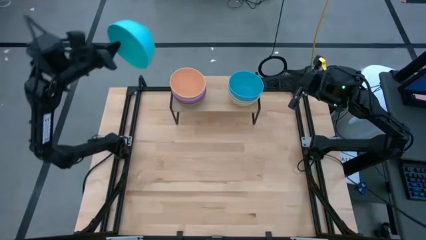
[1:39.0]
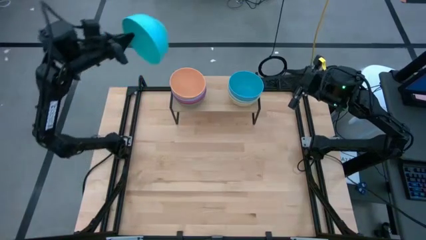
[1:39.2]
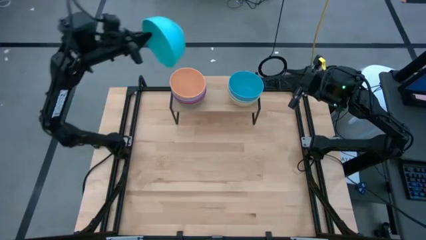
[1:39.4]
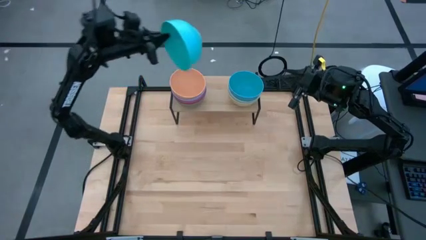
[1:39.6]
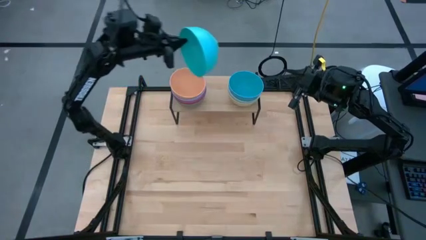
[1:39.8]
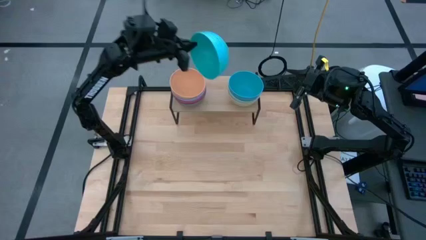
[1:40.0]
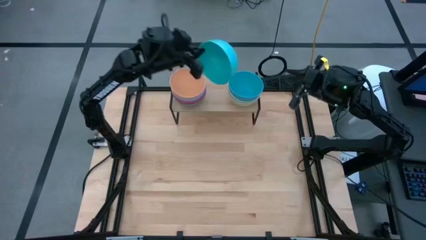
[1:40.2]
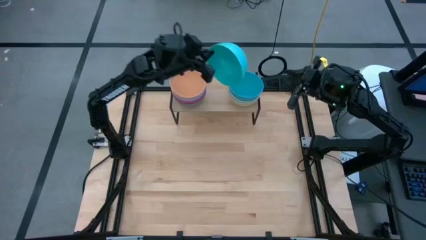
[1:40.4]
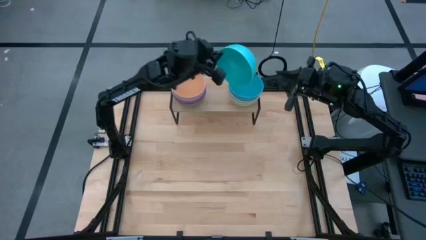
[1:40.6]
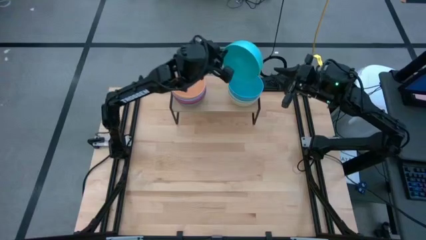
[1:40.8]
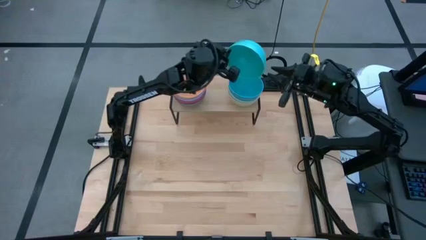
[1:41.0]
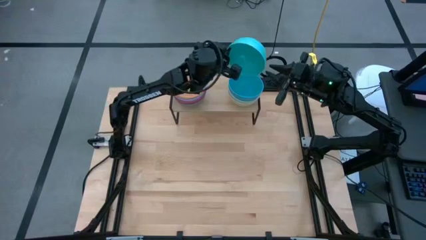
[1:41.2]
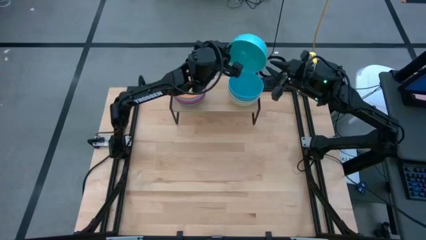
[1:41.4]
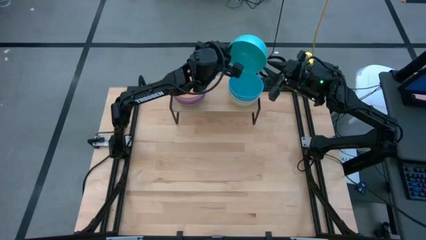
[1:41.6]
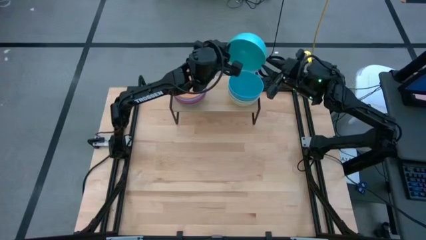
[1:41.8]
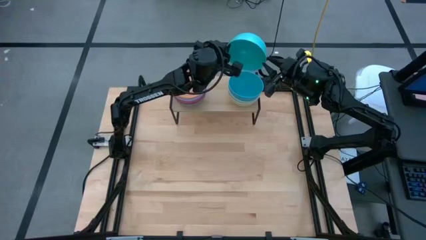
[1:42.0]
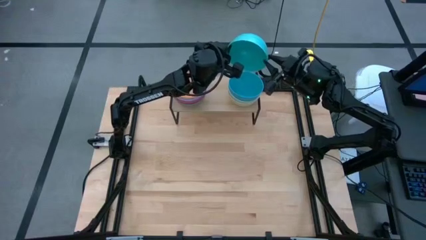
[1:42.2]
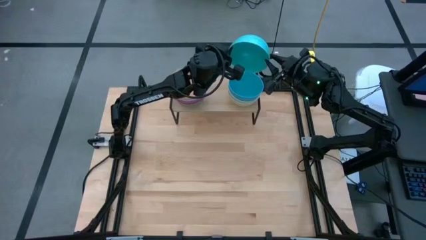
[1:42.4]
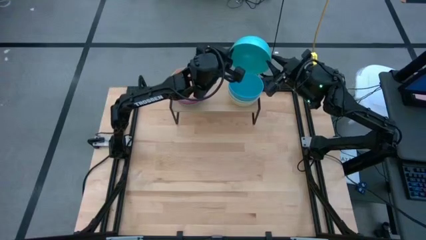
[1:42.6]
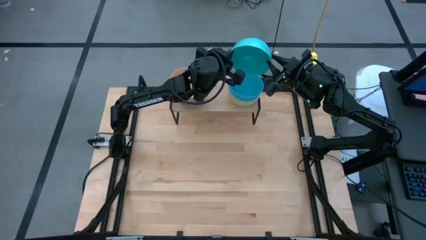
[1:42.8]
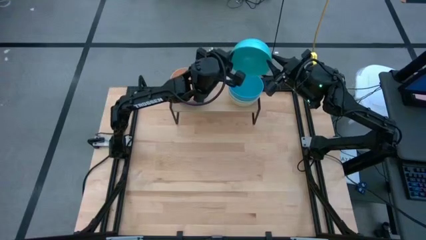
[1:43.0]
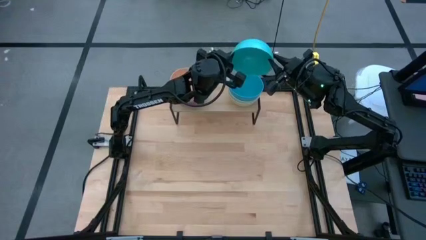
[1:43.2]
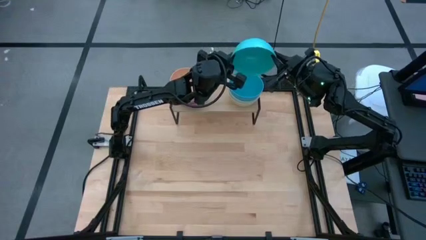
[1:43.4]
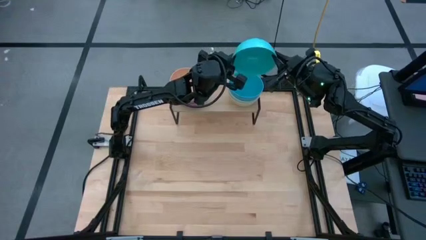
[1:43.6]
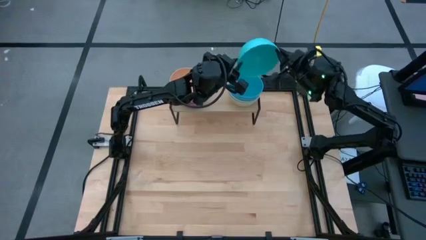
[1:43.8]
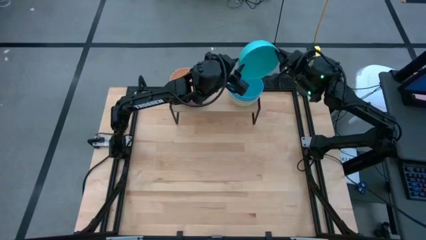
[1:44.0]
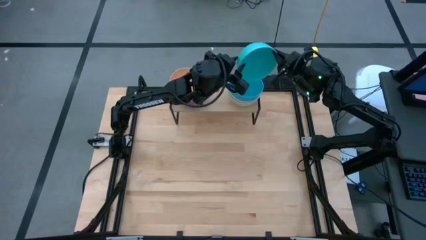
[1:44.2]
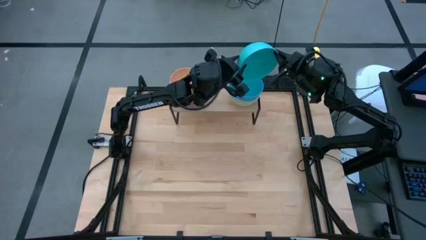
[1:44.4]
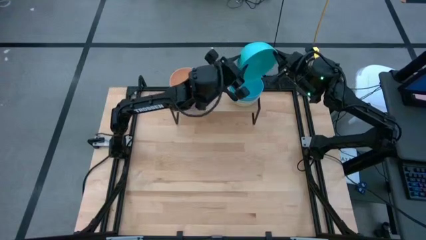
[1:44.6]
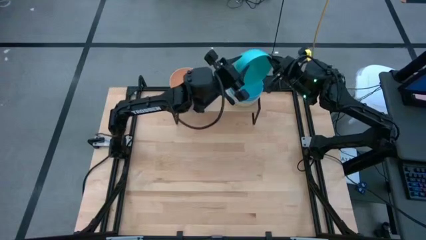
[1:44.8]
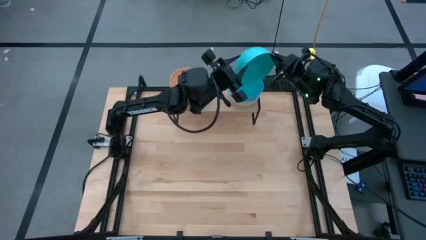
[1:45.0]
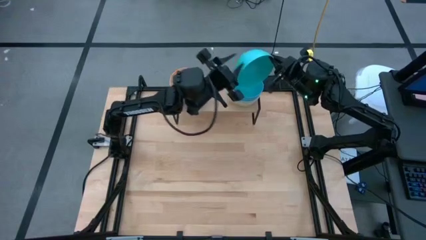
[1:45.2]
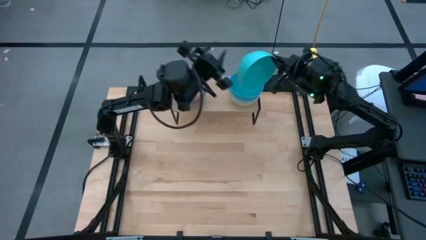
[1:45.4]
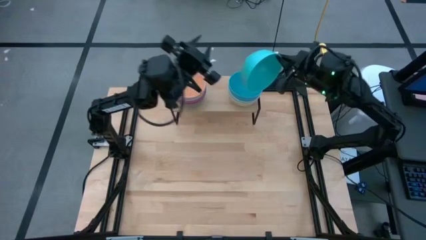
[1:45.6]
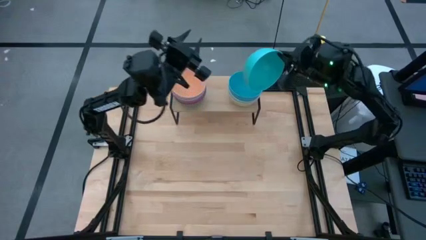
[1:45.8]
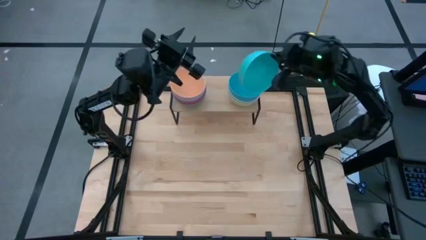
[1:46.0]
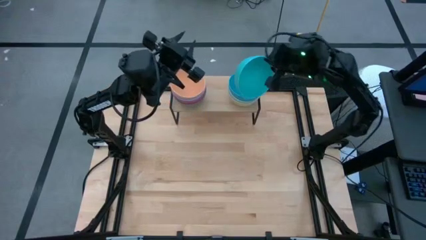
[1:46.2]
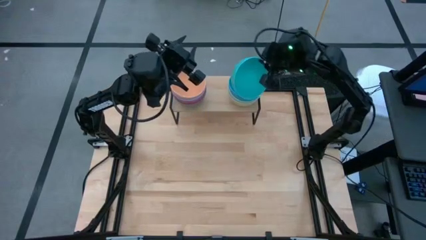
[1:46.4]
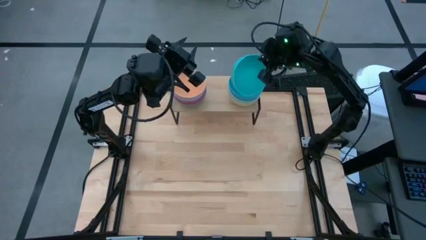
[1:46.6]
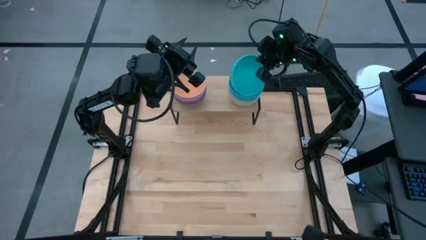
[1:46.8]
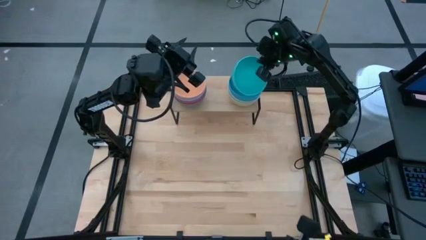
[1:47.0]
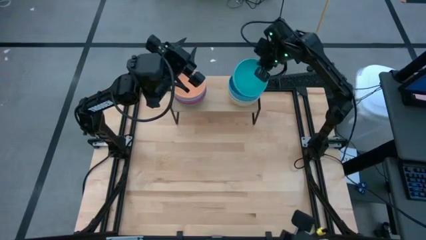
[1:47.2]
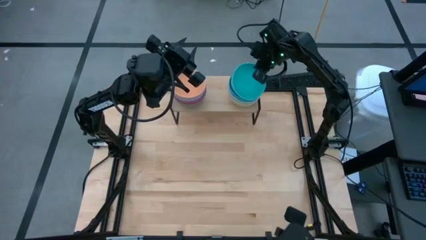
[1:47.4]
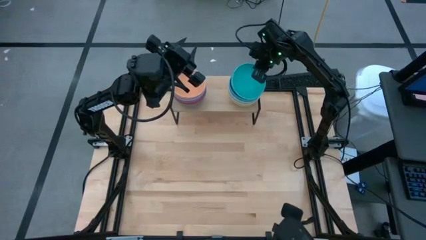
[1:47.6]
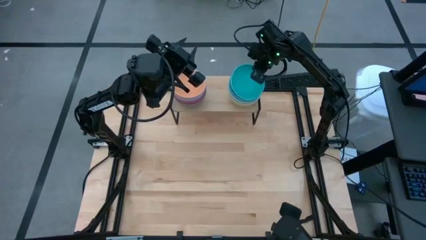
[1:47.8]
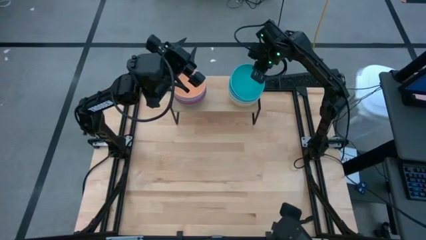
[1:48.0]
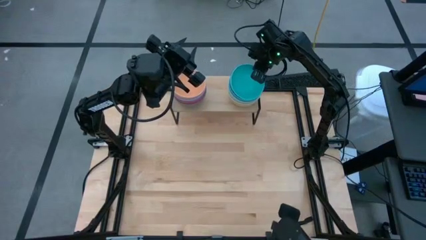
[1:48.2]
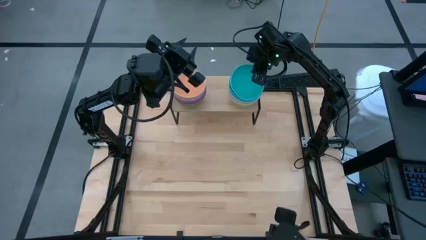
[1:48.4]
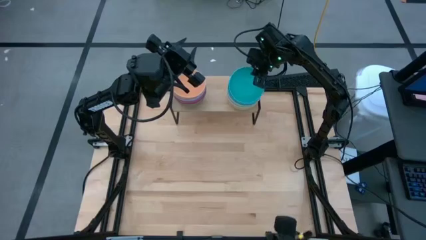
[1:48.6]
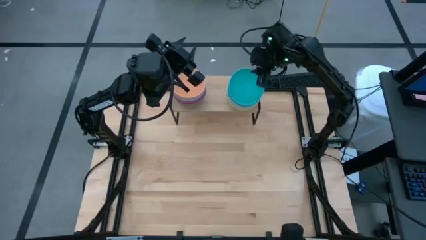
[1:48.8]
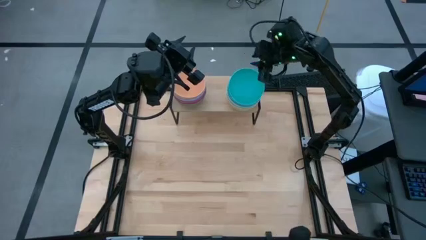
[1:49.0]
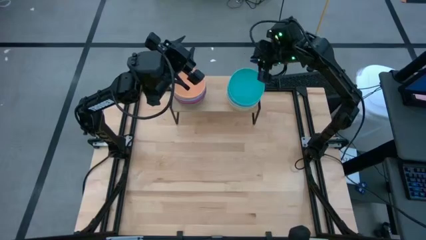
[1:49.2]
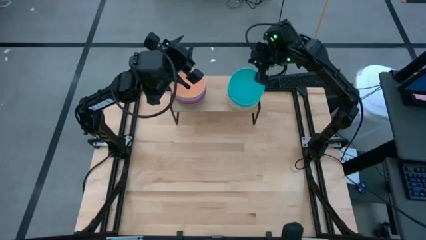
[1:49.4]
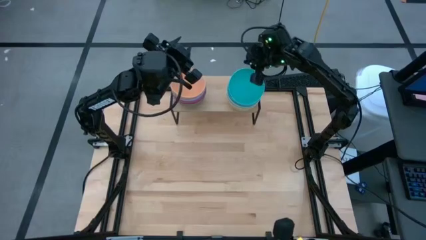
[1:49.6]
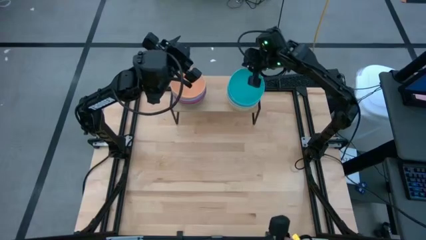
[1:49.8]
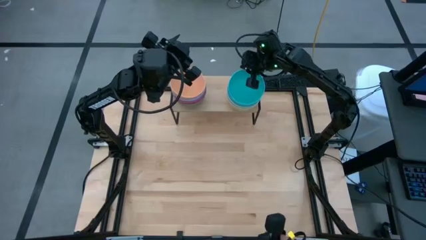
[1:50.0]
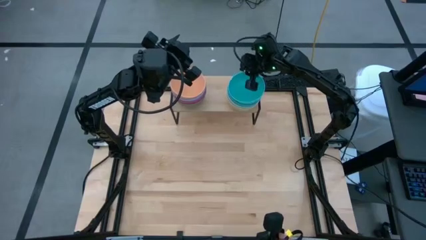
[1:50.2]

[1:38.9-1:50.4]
Task: Place and stack bowls onto a shelf
Stack the light blue bowl on top of the blue bowl on the shelf

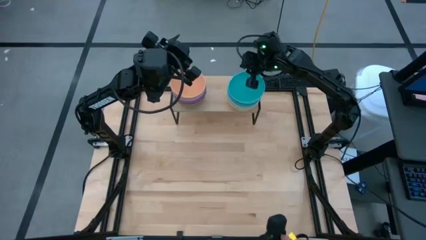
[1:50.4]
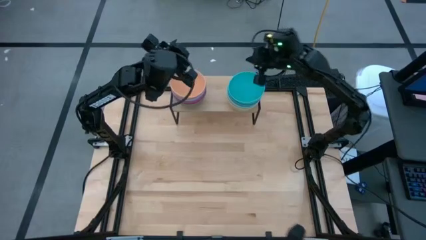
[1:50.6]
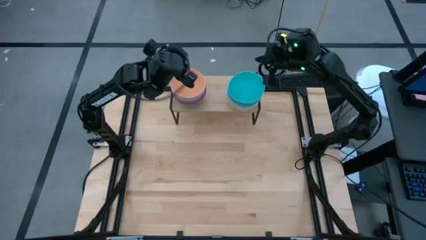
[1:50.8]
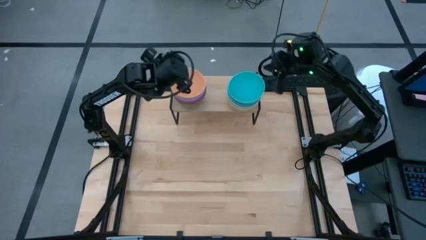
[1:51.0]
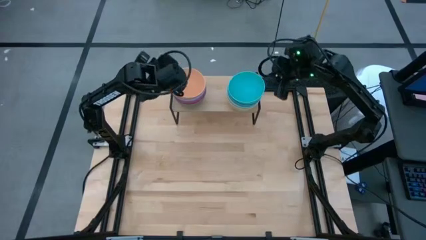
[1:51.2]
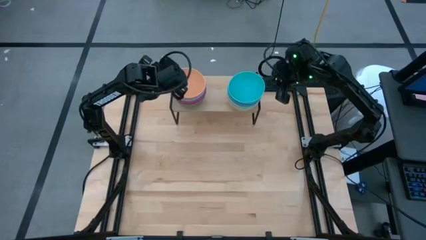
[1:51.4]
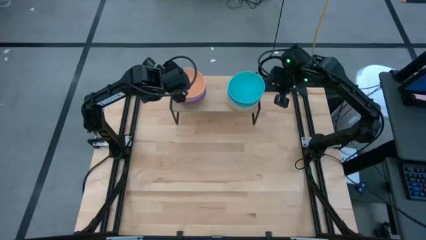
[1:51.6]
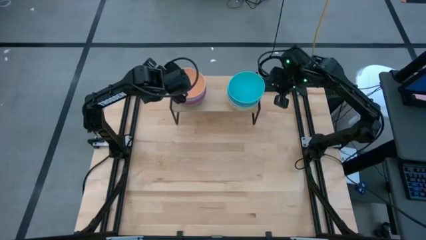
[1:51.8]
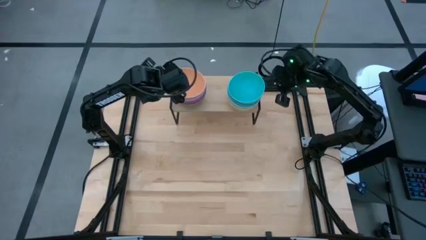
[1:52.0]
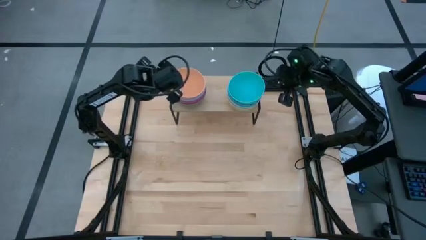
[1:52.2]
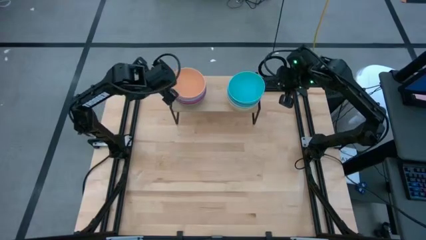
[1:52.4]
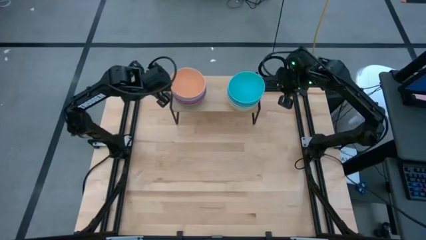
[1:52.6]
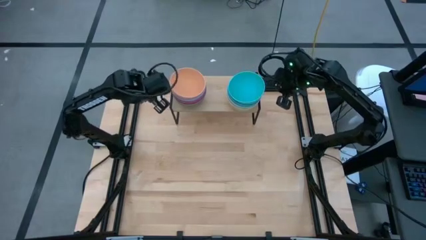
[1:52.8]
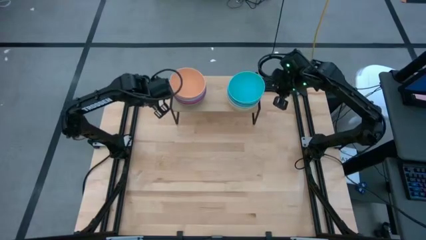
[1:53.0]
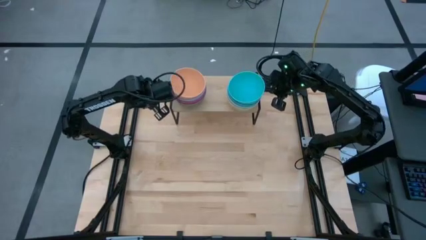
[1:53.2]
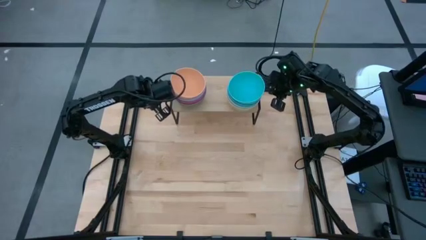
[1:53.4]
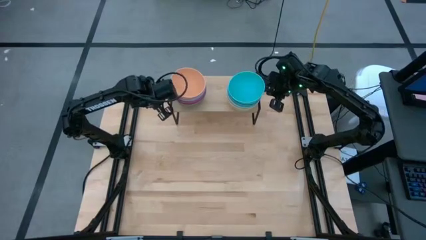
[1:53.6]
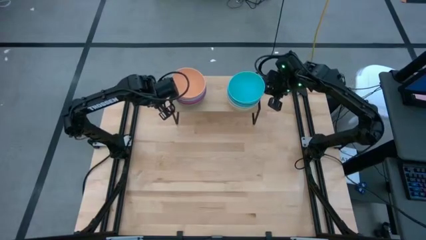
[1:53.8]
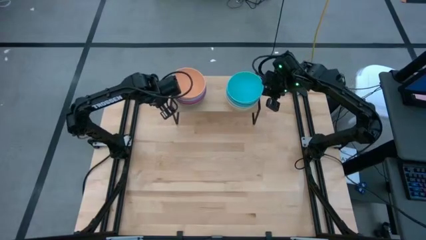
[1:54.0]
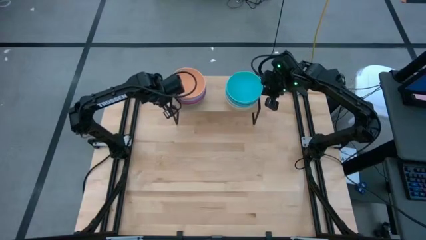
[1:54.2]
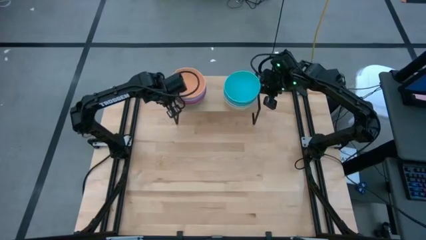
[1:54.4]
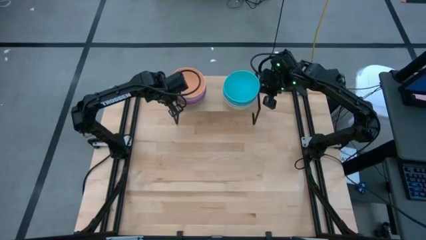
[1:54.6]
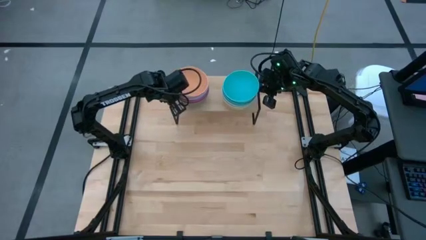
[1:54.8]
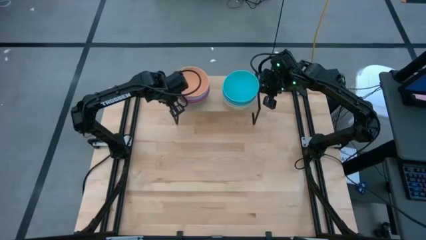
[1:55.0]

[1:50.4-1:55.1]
Adjust the stacked bowls on the shelf

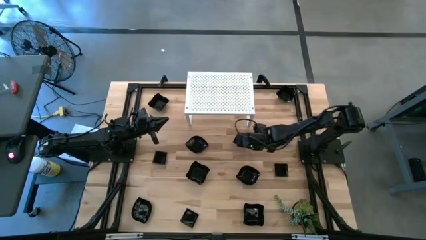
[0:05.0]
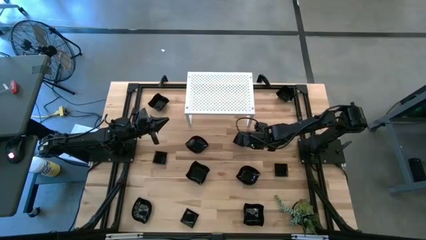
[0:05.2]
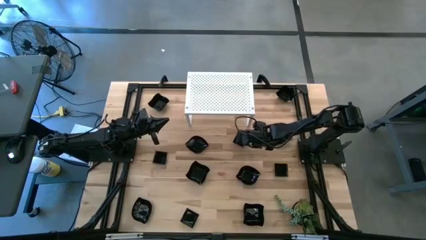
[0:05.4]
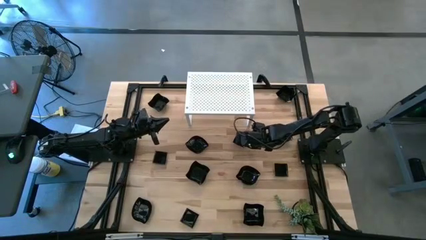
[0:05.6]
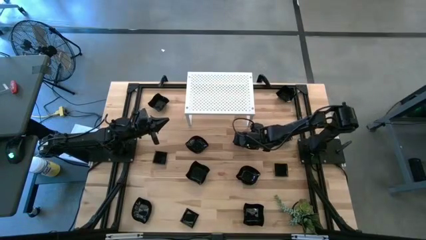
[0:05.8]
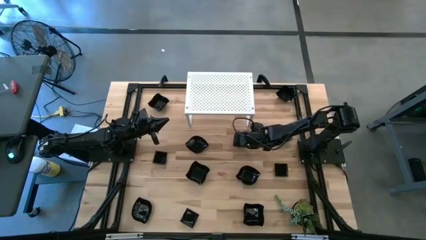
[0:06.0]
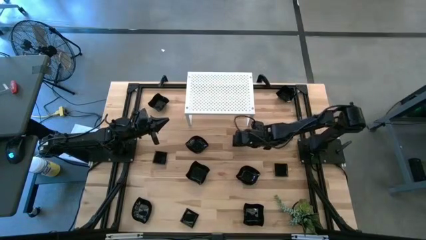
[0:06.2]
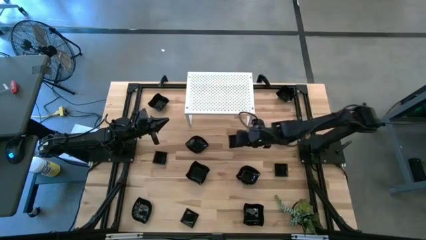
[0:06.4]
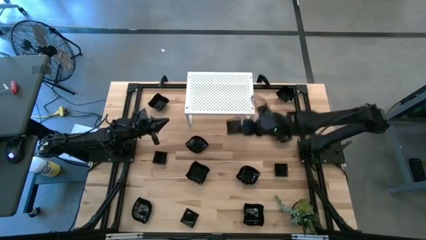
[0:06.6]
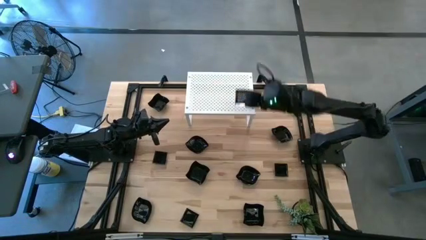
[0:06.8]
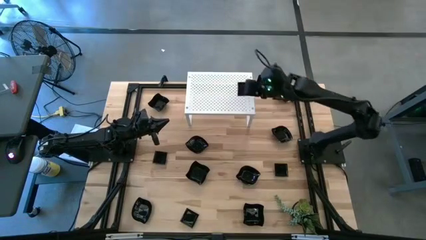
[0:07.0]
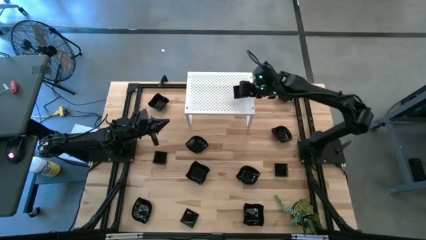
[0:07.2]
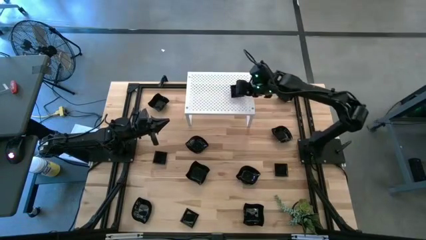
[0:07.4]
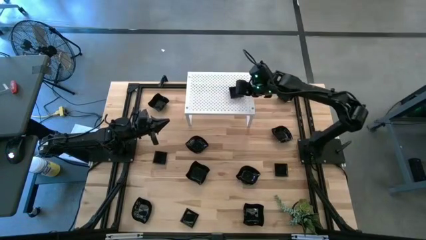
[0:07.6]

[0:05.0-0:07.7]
Task: Pick & Place Mini shaped plates
Put the black square plate on the shelf
